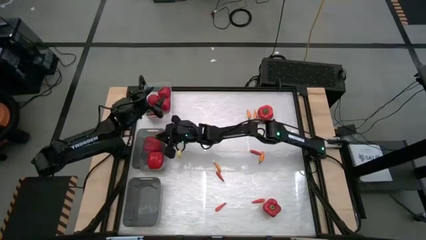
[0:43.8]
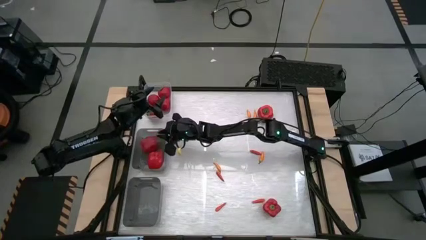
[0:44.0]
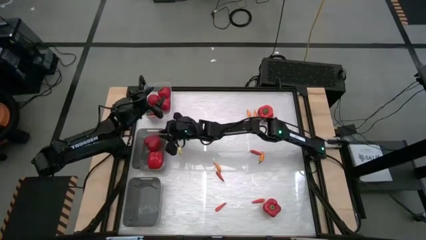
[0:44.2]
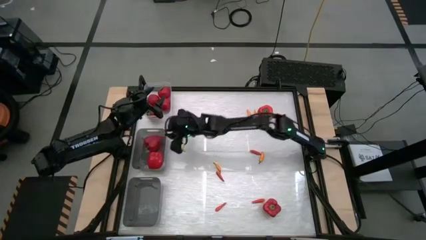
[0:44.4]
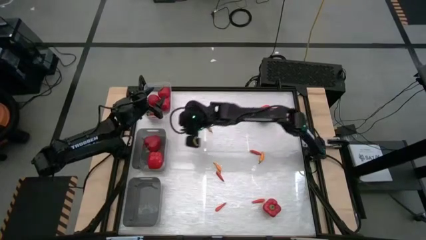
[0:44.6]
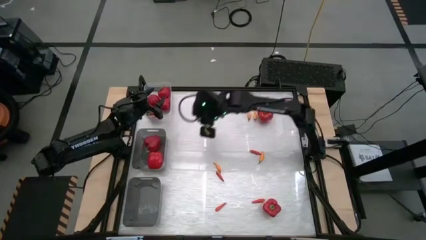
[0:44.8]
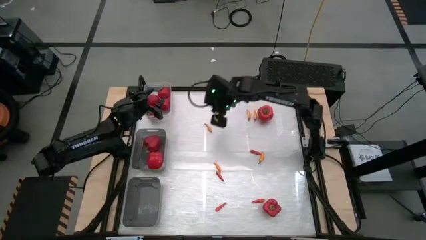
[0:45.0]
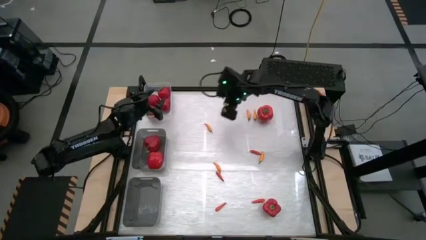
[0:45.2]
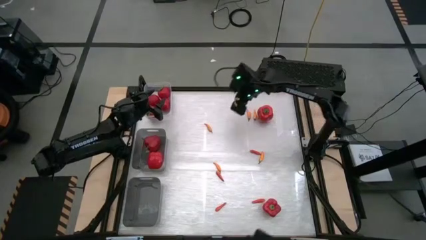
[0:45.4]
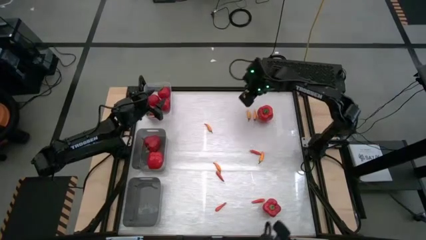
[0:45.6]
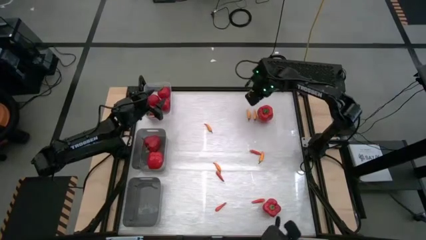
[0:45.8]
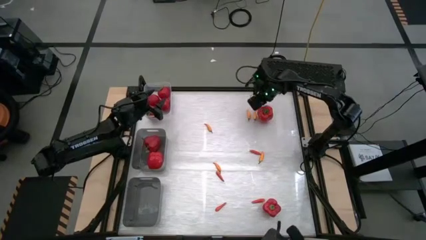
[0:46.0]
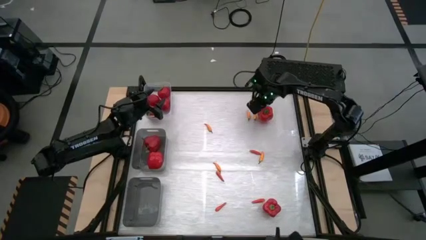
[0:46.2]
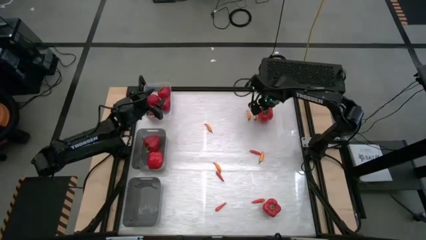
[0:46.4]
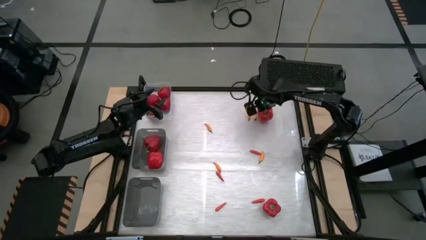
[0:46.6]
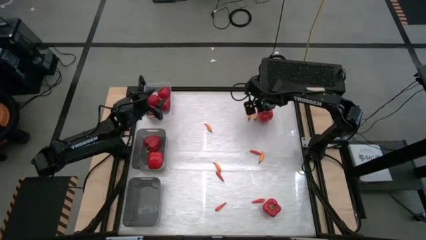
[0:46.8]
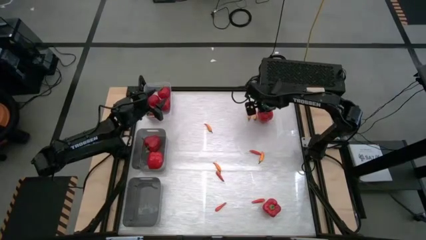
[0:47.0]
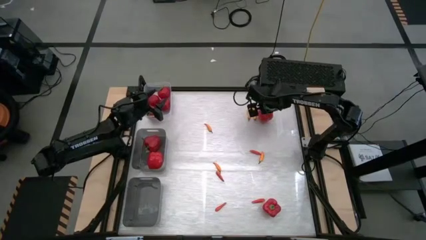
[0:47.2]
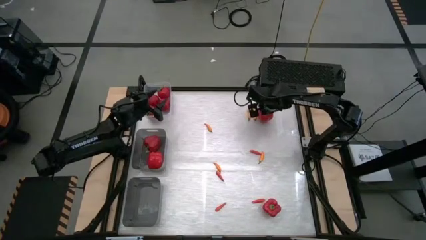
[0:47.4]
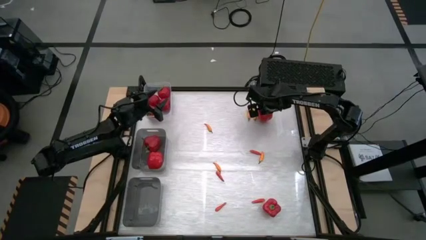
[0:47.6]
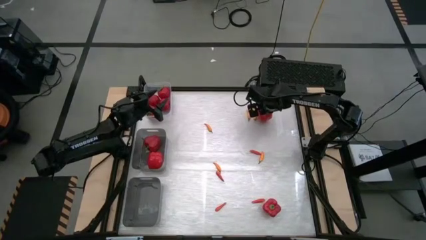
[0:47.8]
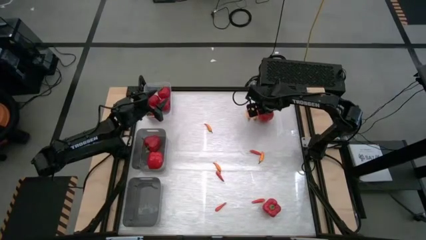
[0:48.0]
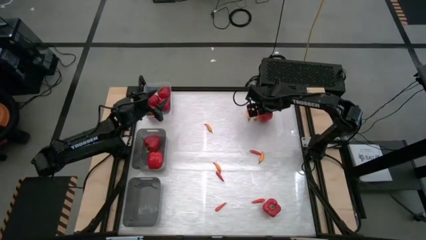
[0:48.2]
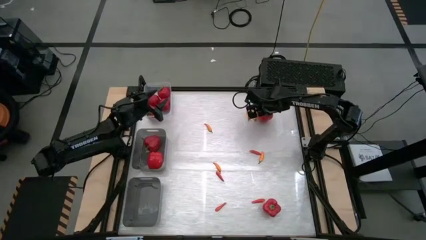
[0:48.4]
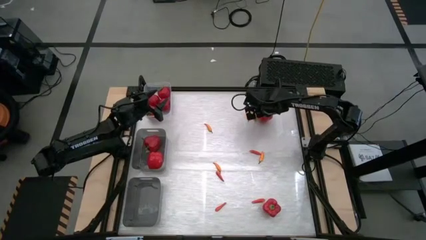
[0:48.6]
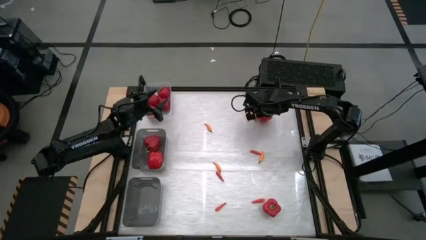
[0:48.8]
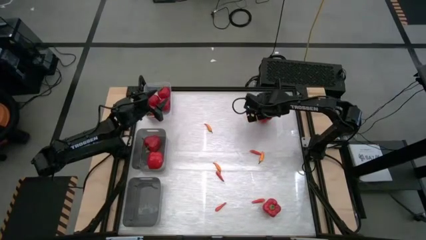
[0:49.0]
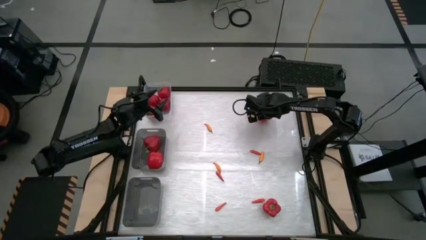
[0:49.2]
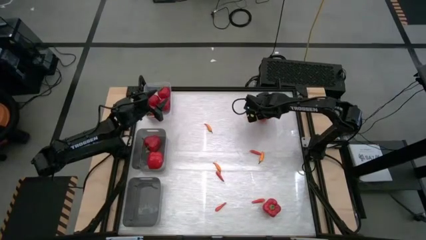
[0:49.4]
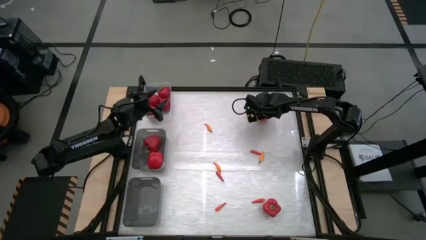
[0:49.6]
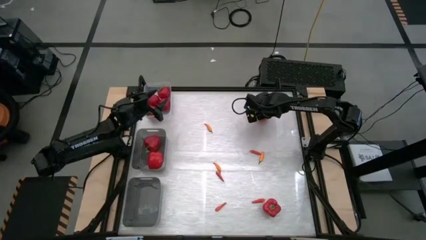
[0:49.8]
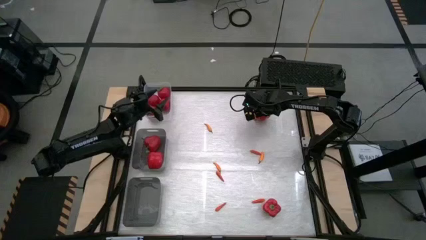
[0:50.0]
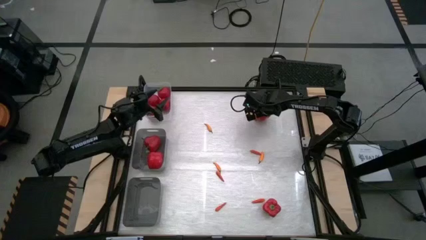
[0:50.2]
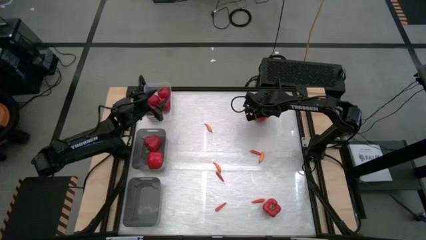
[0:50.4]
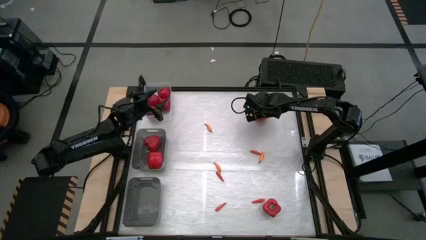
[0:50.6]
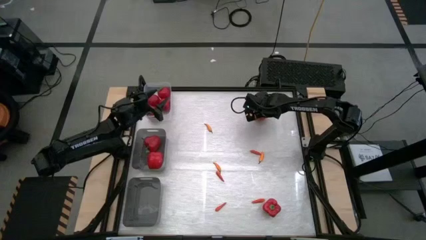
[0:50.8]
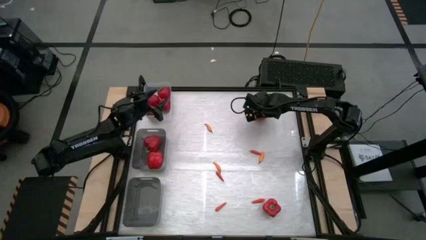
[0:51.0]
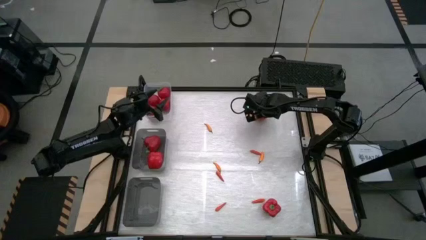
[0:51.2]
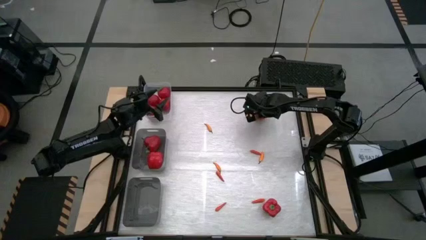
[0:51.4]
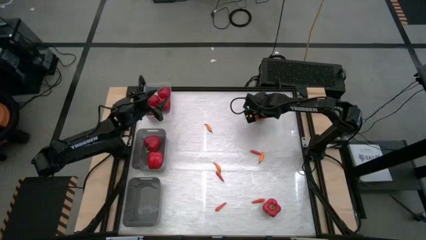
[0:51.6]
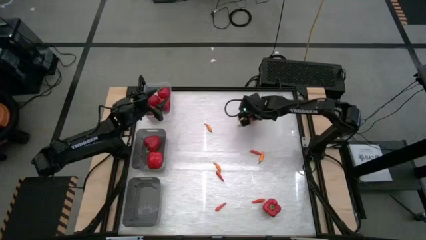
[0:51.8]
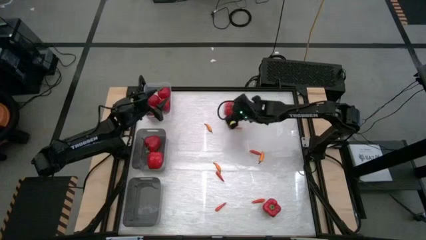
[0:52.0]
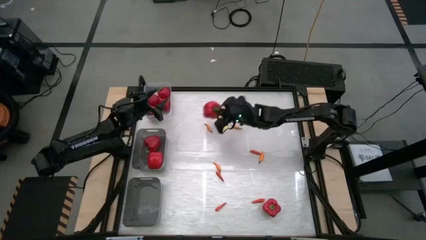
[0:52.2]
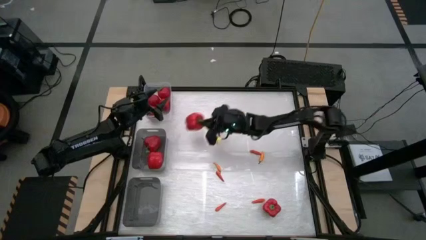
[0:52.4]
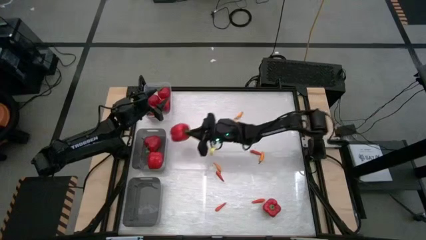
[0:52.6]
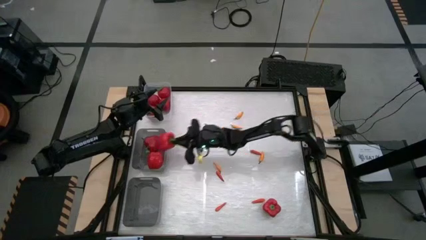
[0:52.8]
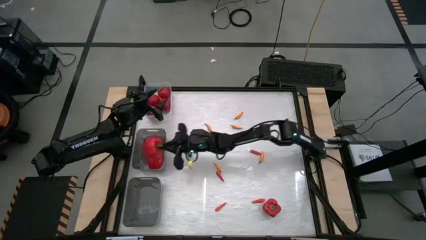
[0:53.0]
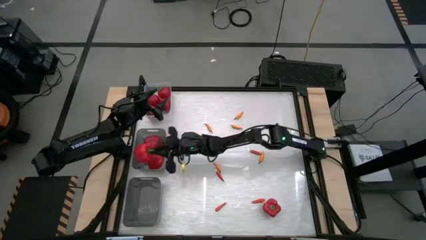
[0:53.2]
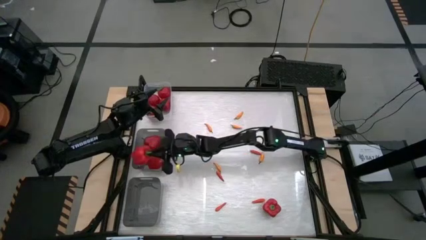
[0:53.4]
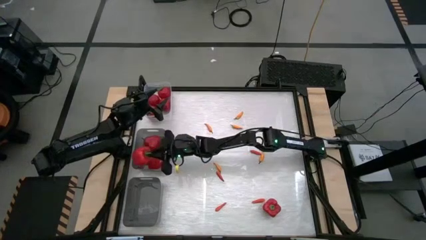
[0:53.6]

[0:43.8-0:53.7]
Task: Sort produce into baskets
Put the bell pepper into the top gray bin

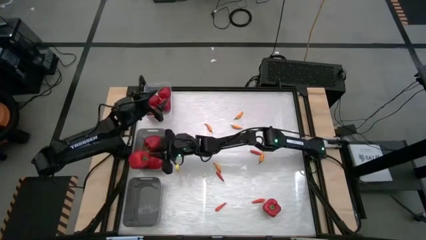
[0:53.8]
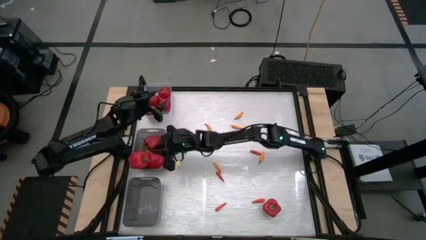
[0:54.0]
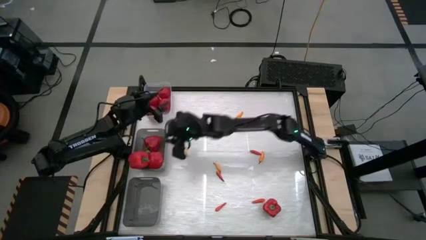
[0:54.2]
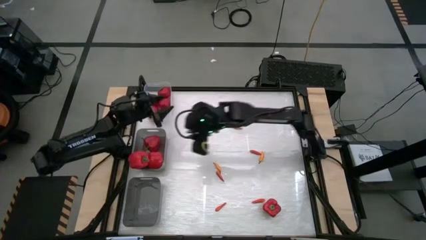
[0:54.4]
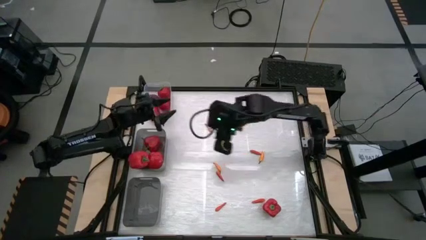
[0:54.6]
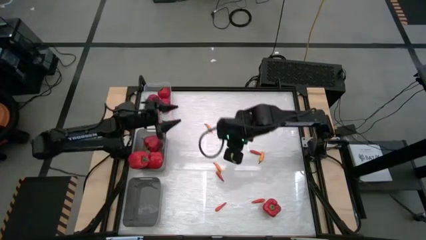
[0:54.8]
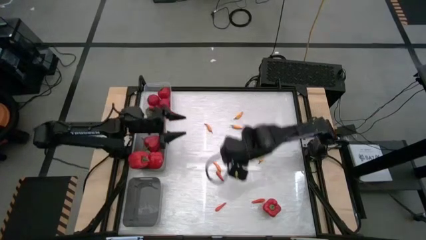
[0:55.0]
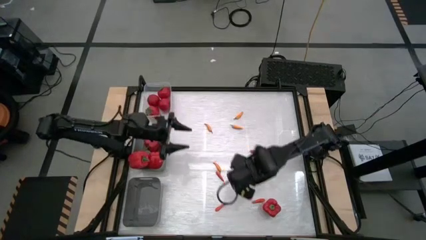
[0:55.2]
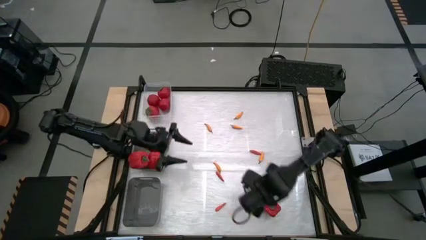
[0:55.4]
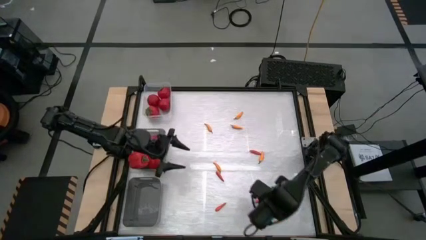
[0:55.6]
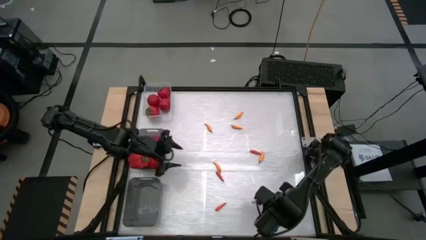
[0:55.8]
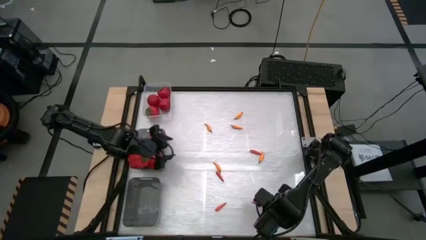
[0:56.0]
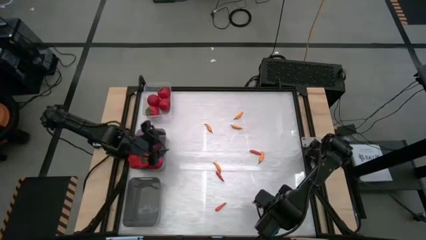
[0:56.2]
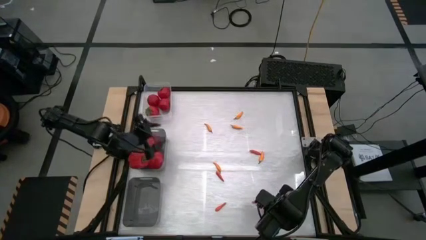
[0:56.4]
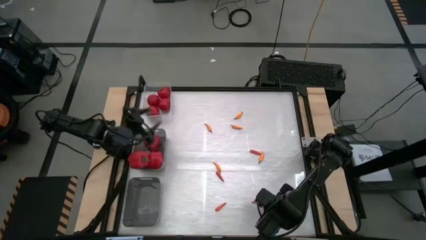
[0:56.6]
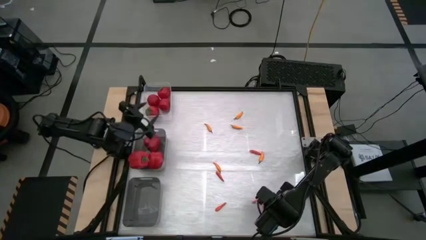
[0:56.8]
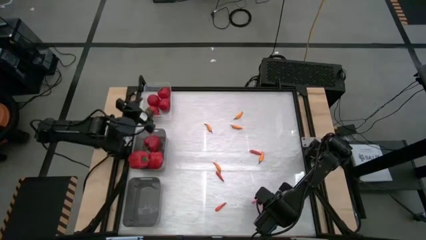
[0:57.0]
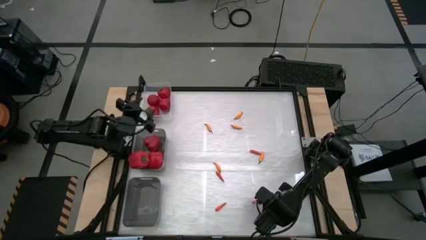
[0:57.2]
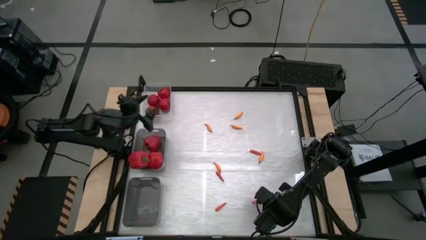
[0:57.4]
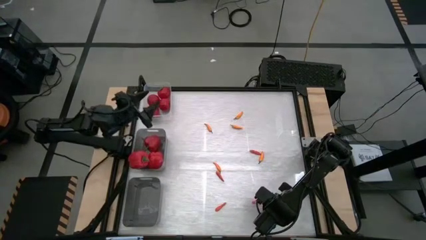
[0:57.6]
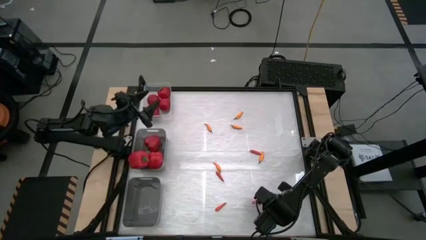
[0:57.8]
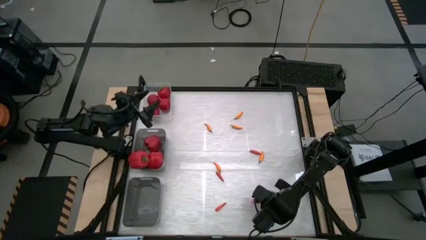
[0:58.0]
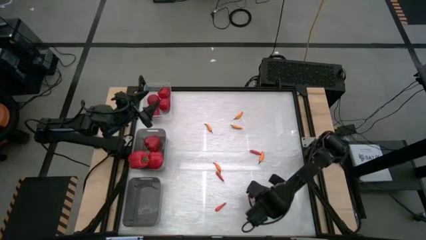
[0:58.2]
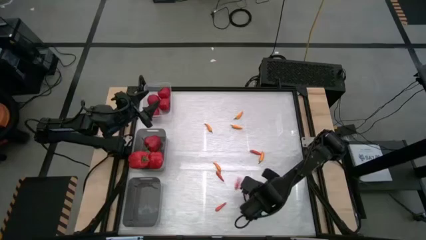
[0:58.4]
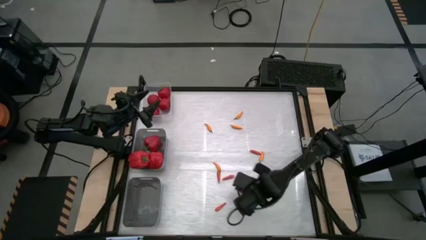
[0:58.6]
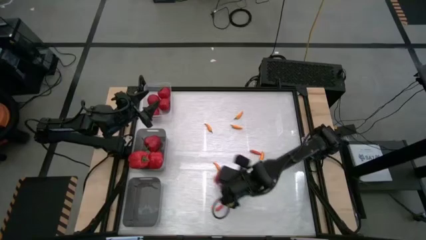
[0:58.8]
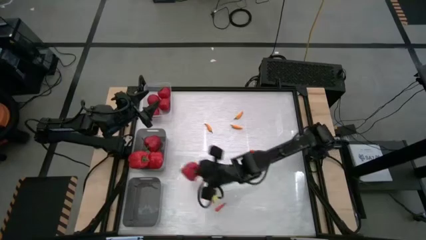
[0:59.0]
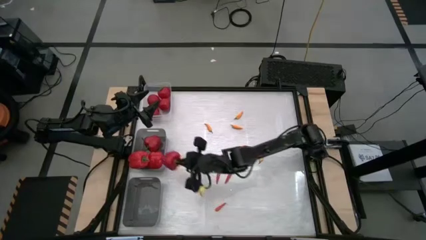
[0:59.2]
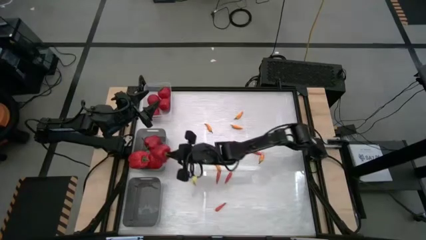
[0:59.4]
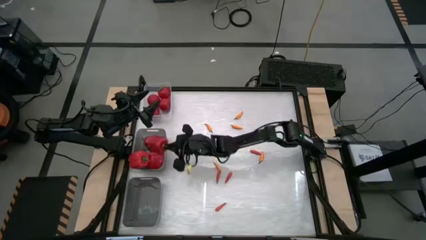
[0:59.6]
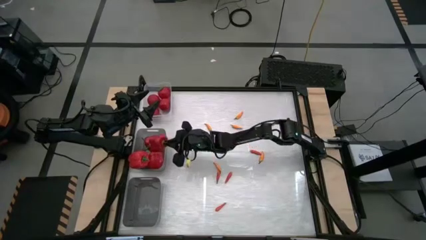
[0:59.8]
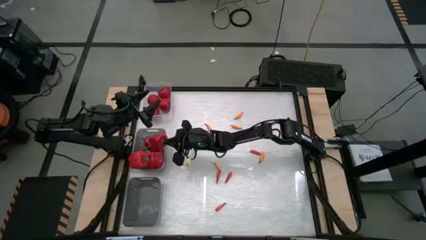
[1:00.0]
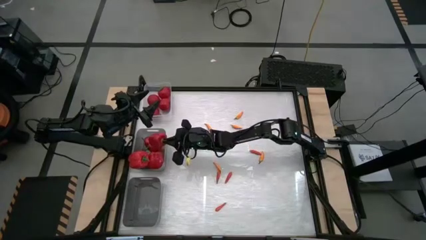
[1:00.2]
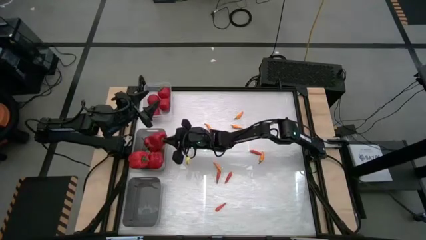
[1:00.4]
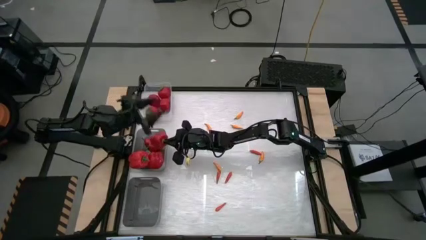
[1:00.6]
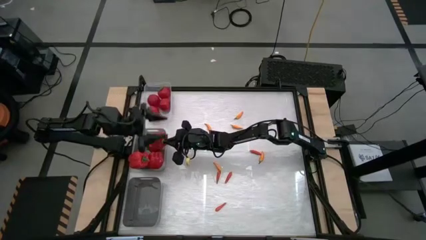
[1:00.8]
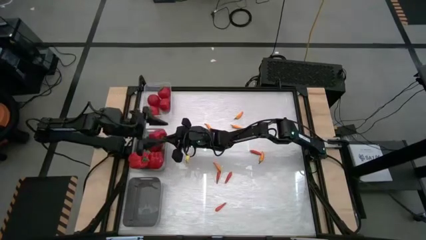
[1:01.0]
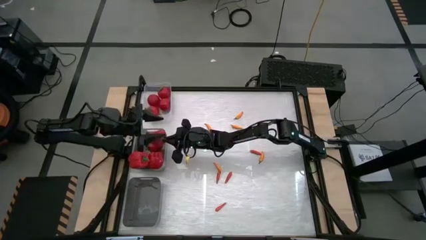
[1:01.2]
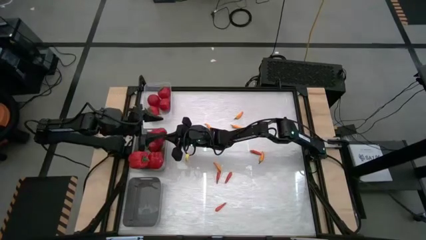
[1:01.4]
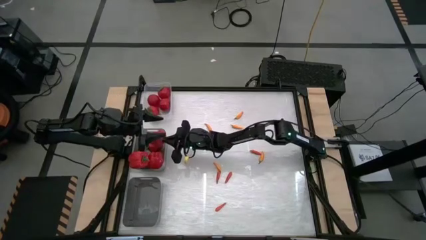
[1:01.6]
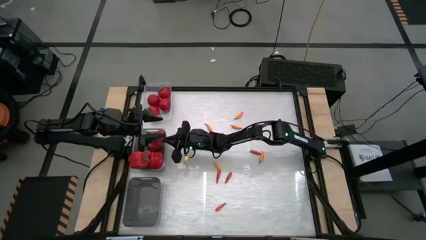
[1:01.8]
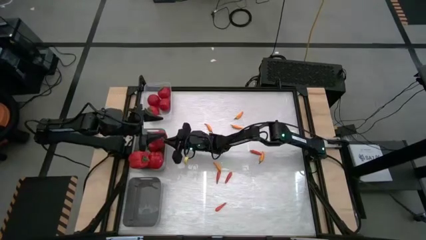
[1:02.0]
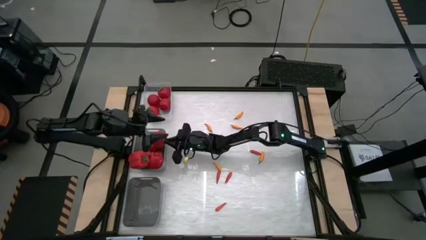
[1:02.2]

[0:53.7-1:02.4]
Put the bell pepper into the top gray bin
